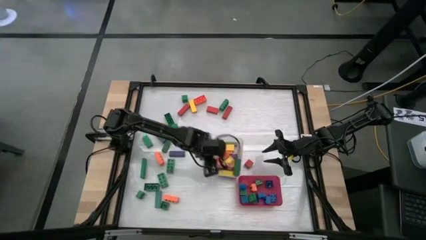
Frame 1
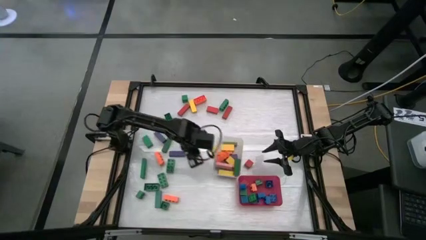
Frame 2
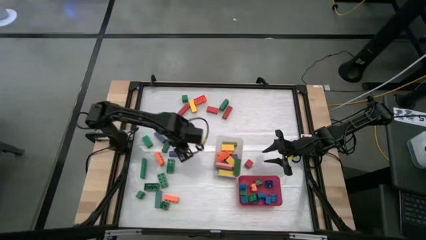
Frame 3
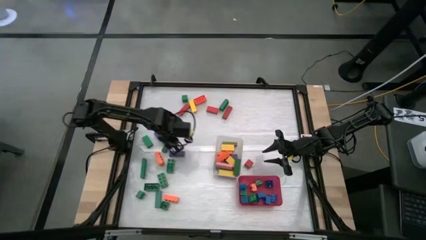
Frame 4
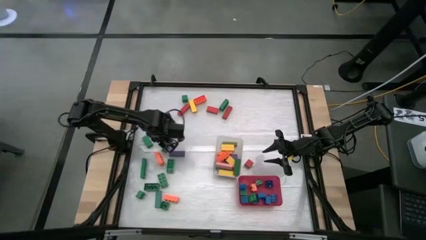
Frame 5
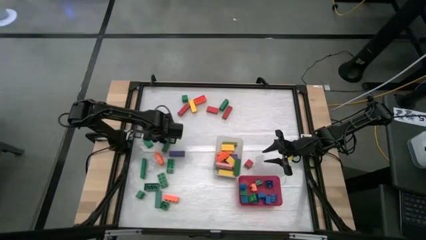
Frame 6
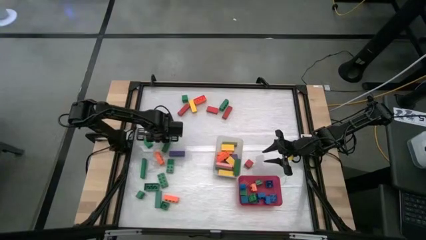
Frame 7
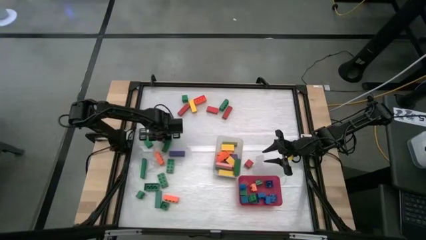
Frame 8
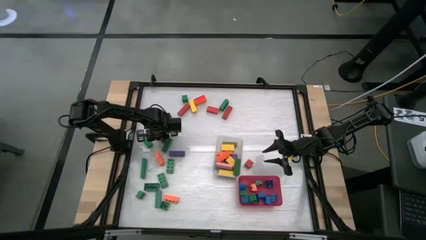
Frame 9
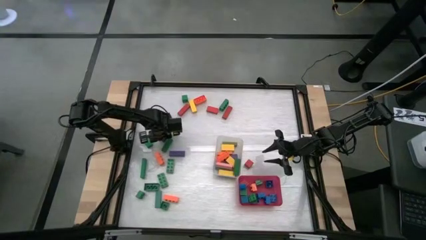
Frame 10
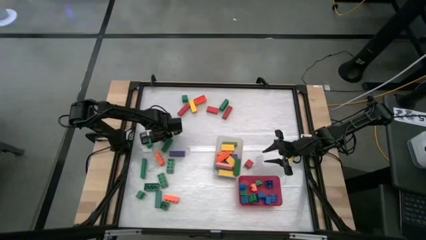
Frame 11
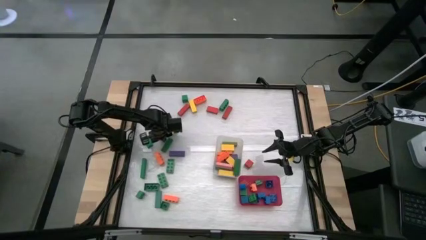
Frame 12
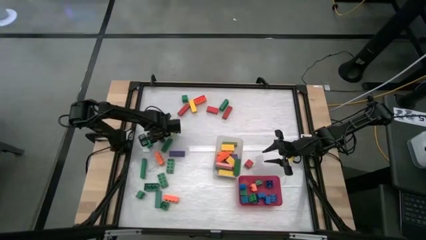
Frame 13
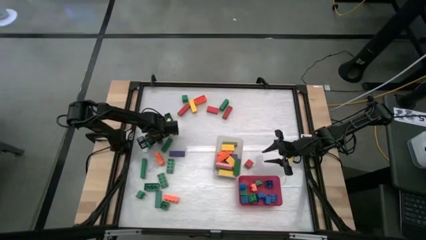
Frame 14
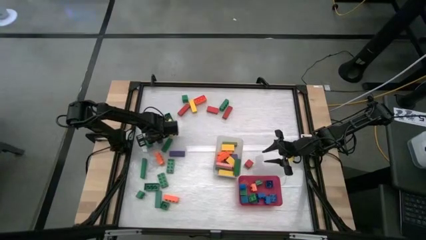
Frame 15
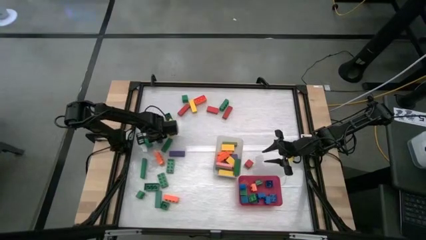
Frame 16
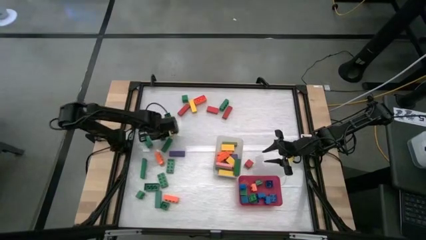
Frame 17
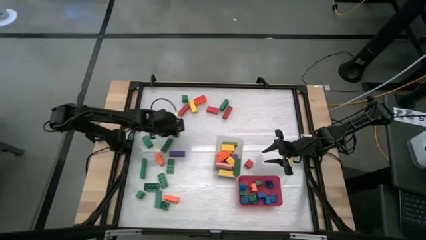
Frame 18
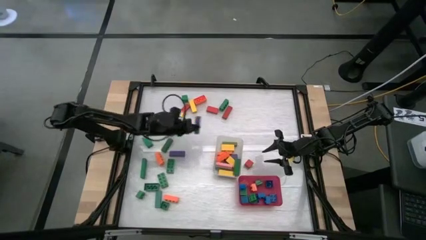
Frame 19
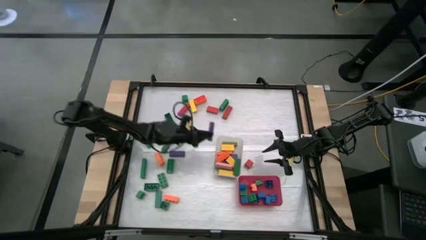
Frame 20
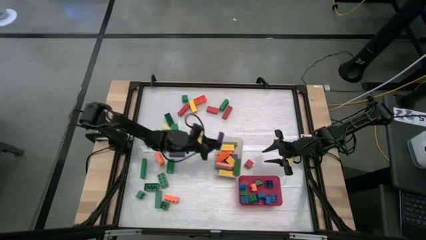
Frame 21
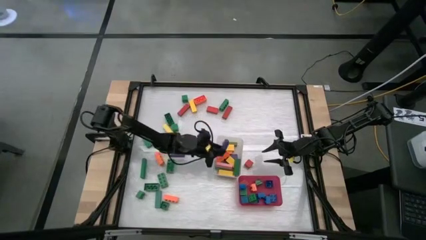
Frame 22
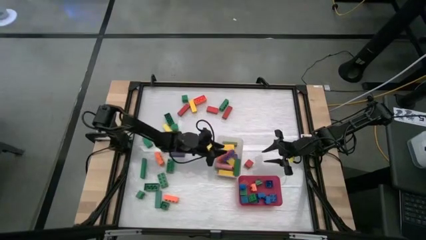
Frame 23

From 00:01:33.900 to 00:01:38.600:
Task: Sort blocks by size
Put the purple rectangular block into the transparent bin

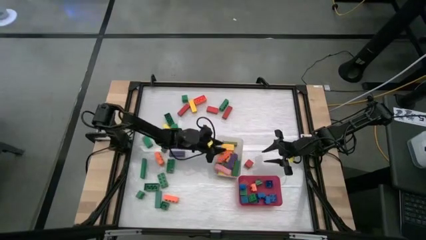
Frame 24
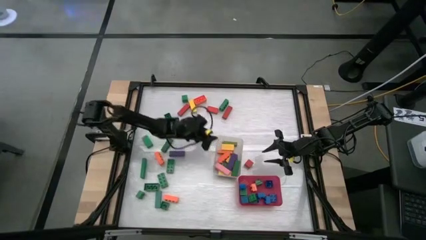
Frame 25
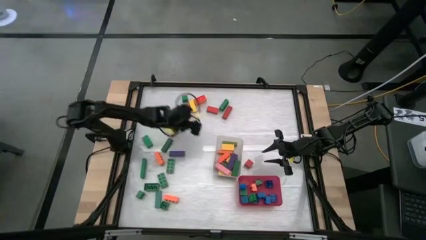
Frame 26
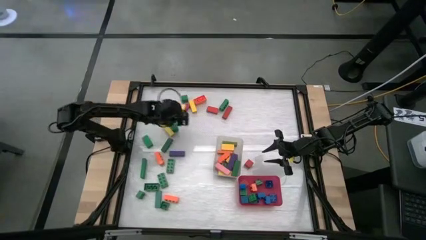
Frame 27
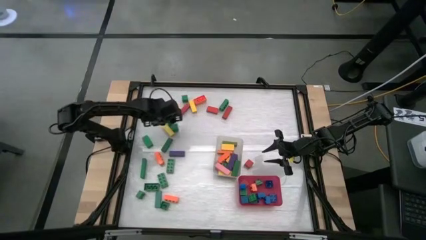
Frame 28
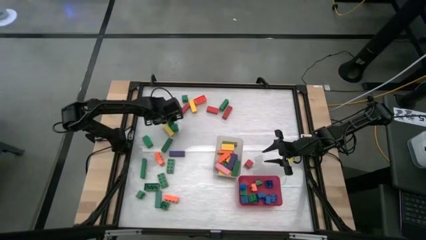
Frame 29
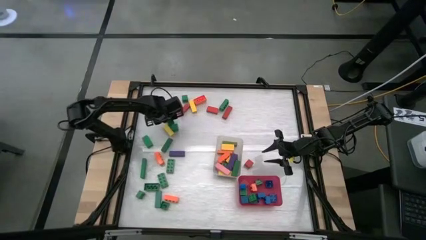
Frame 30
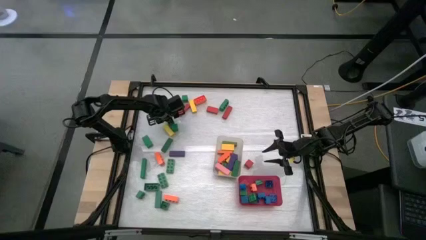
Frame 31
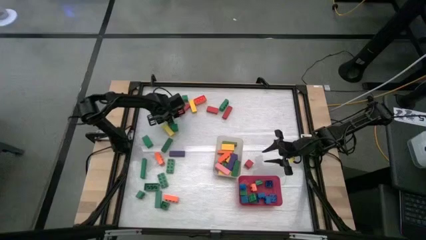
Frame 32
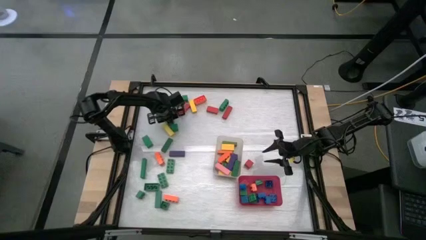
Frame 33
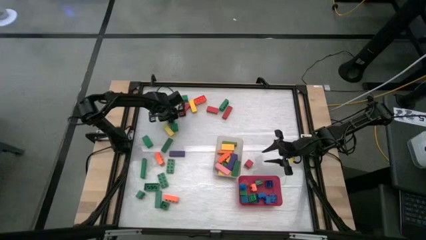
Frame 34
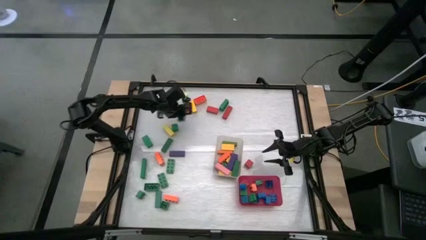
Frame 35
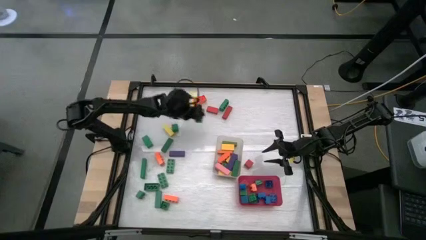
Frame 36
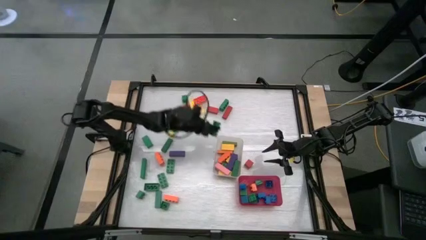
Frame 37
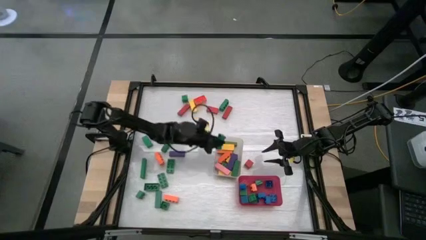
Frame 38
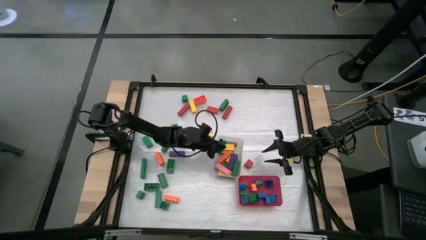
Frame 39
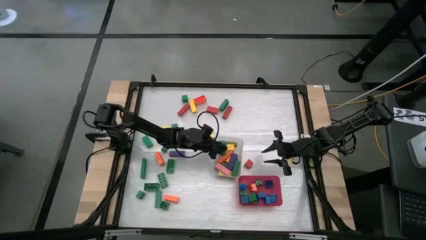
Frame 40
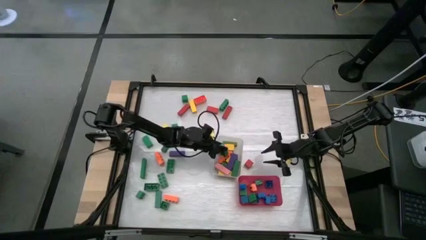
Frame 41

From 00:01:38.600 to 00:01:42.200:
Put the green rectangular game piece into the transparent bin

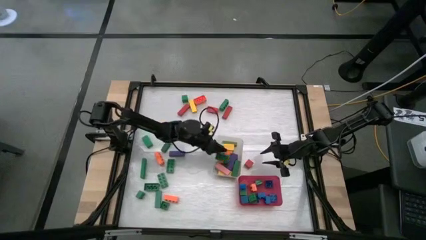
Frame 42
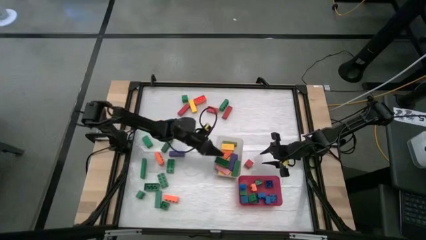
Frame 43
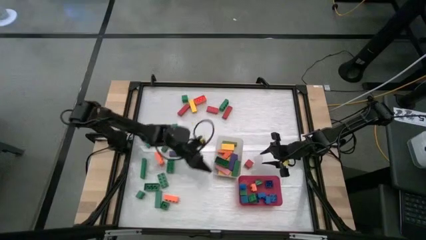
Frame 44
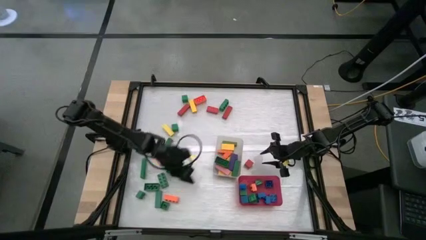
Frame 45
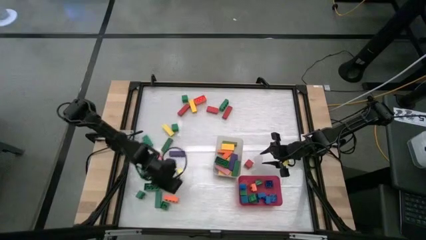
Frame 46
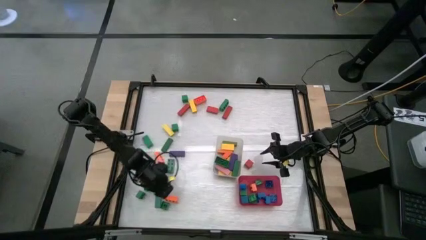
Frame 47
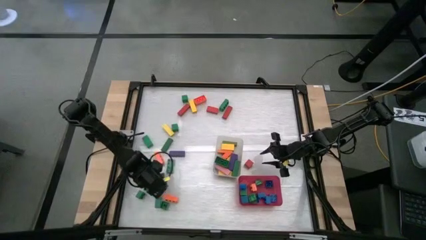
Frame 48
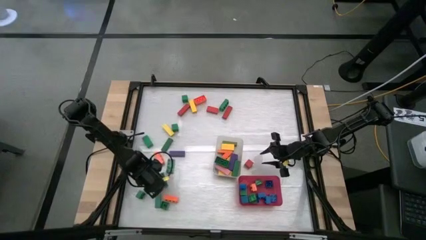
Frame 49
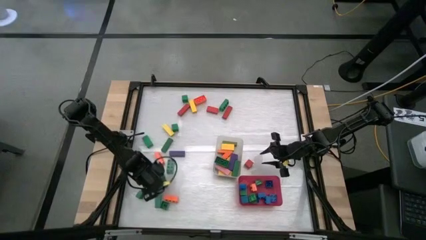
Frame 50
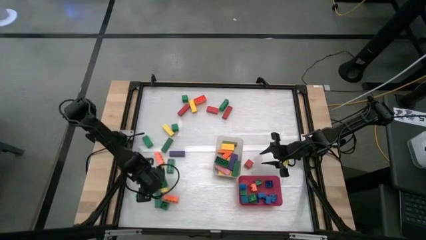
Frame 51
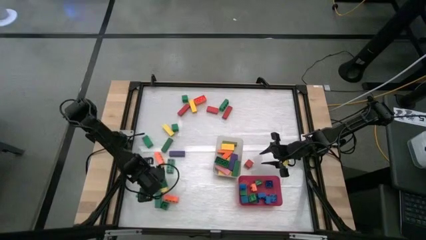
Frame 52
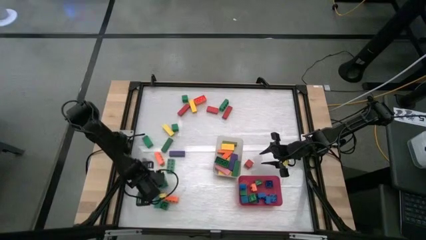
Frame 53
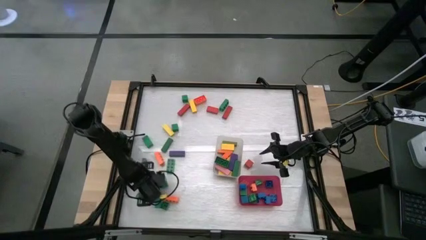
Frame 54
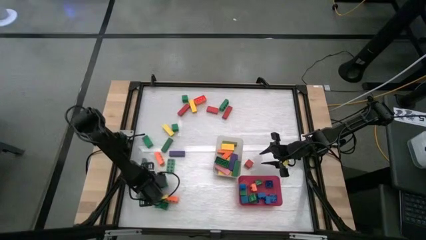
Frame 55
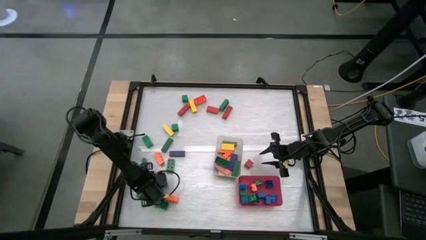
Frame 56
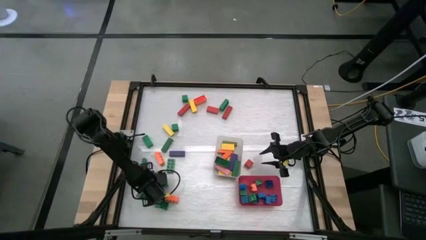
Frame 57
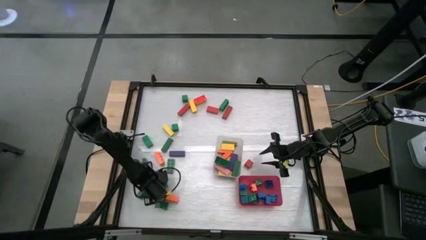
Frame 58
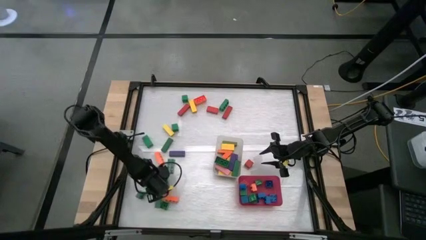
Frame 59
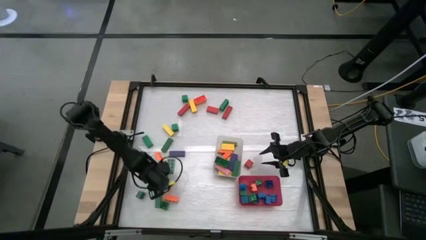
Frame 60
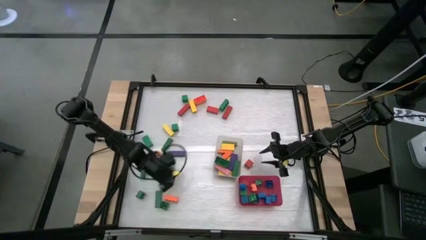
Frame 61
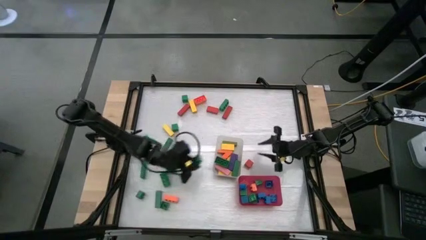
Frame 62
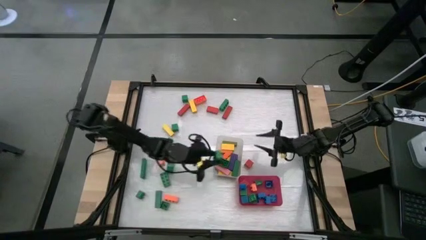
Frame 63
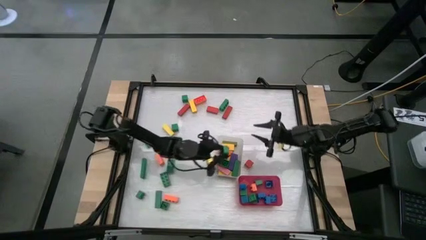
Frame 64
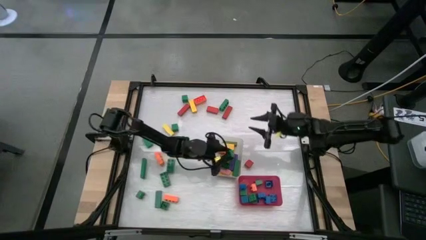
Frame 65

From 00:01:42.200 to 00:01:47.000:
Put the green rectangular game piece into the transparent bin

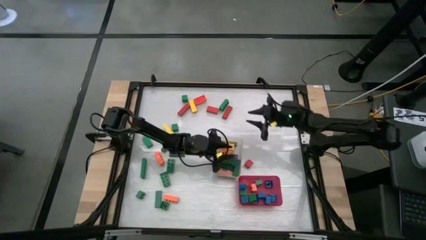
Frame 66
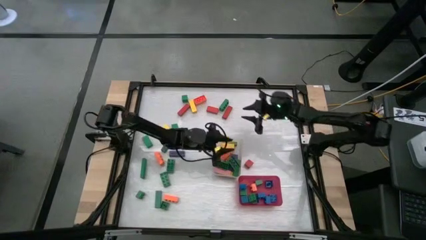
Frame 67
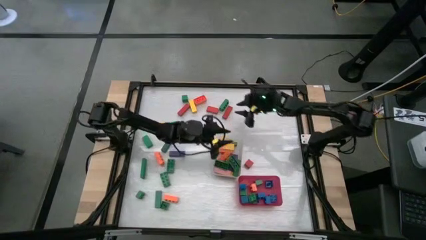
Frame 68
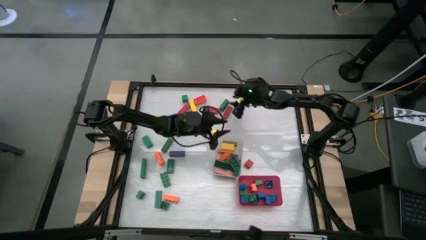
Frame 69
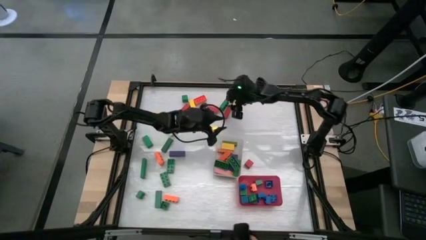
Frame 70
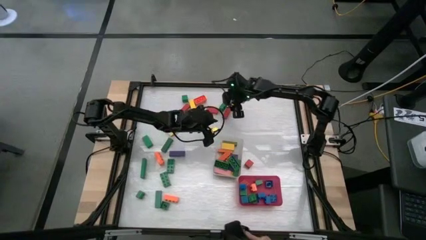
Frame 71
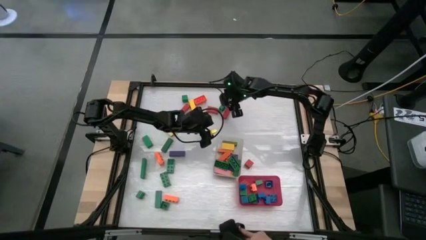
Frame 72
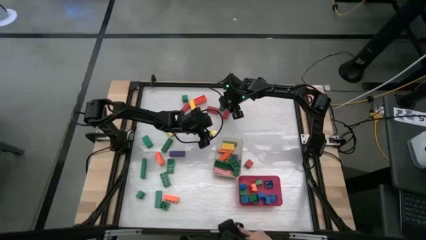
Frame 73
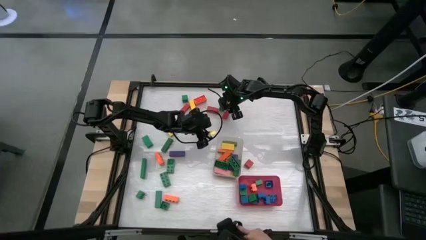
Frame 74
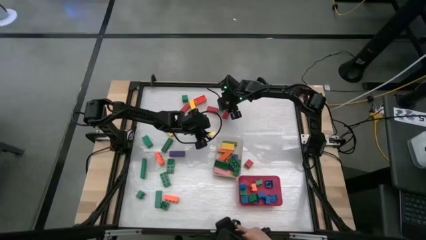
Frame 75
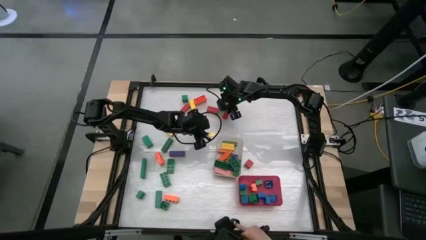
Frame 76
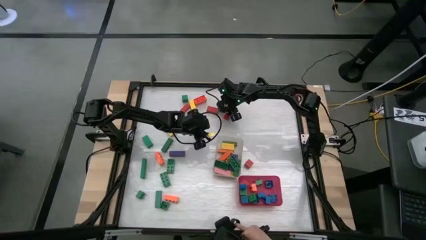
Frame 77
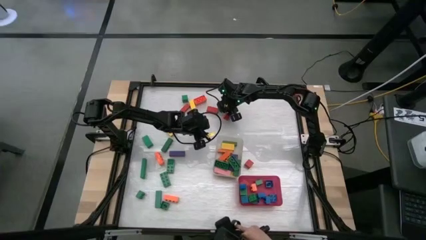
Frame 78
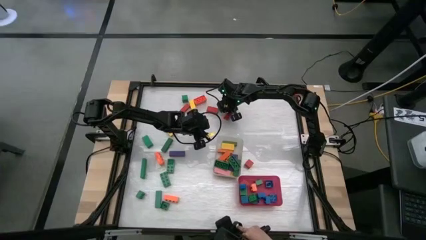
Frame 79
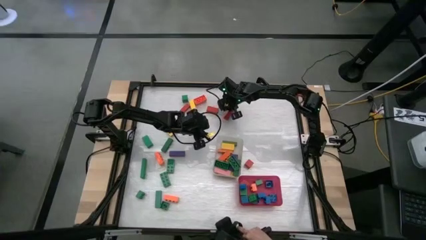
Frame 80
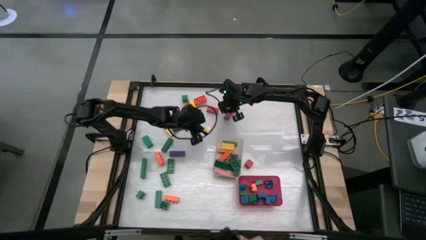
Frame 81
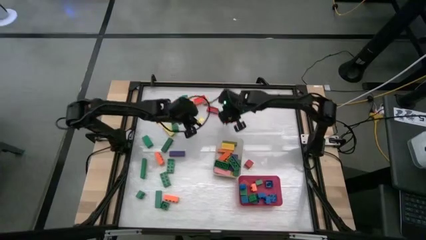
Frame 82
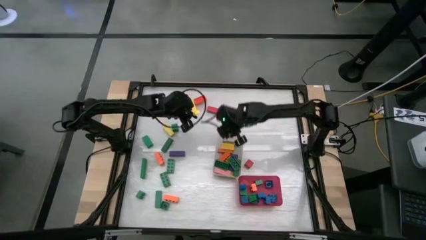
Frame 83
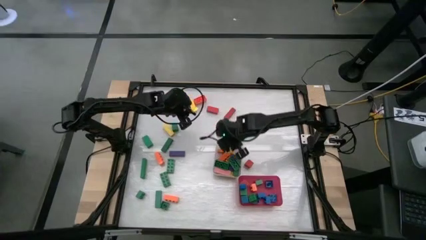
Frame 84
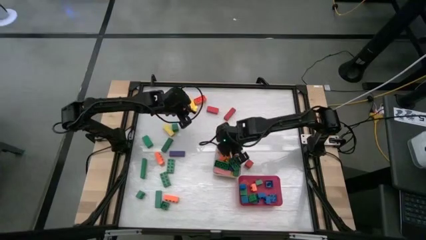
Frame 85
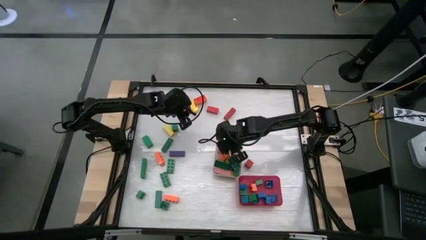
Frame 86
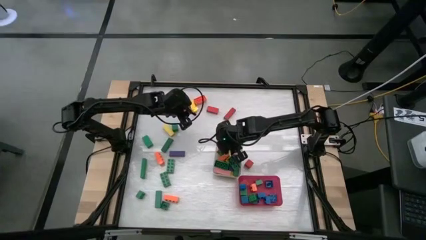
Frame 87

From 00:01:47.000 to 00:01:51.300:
Put the green rectangular game piece into the transparent bin
